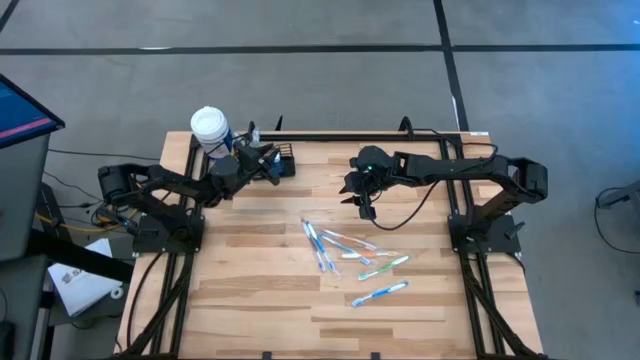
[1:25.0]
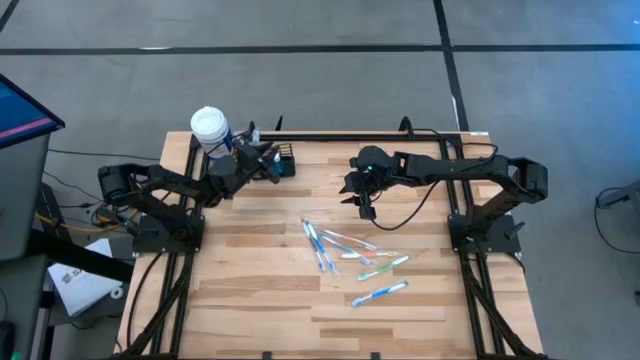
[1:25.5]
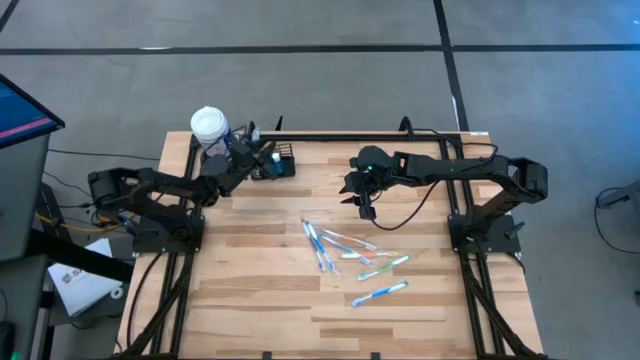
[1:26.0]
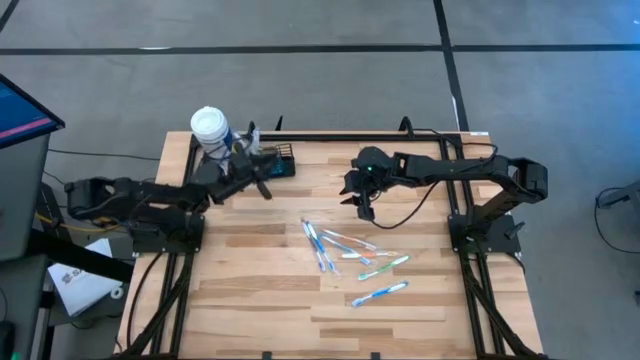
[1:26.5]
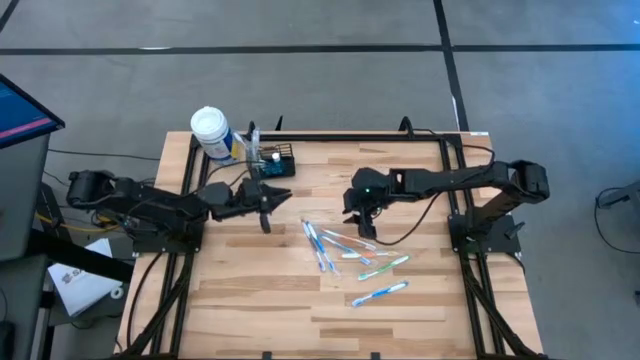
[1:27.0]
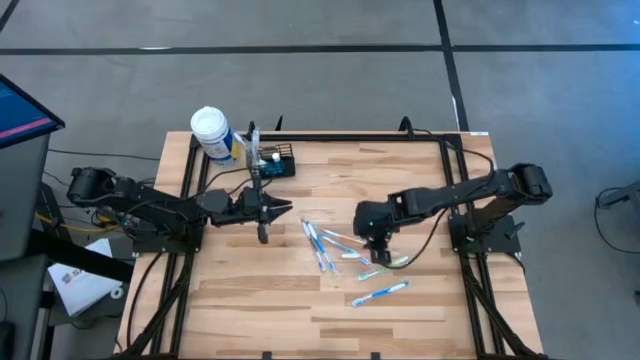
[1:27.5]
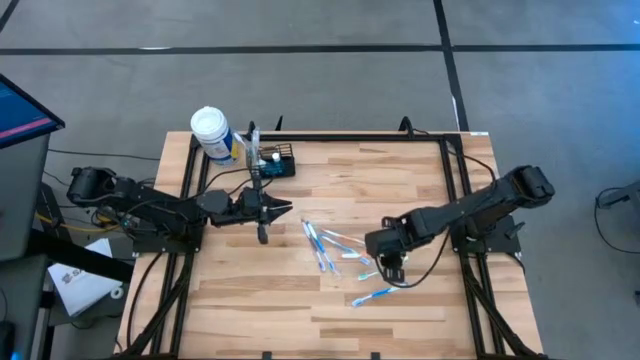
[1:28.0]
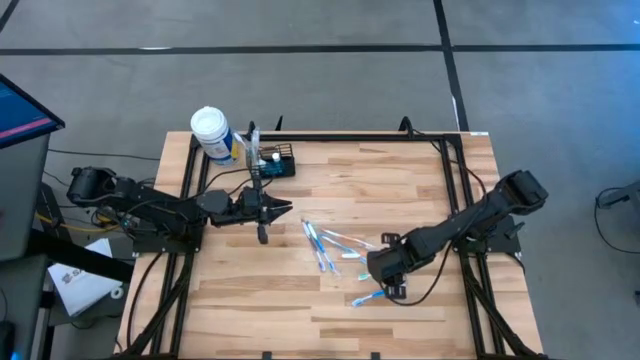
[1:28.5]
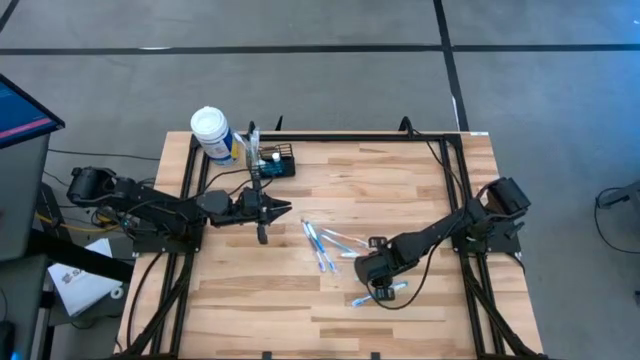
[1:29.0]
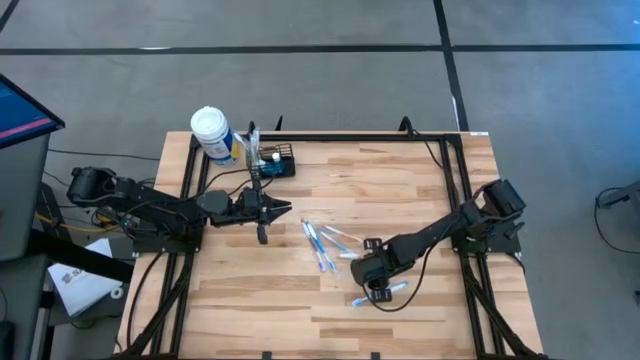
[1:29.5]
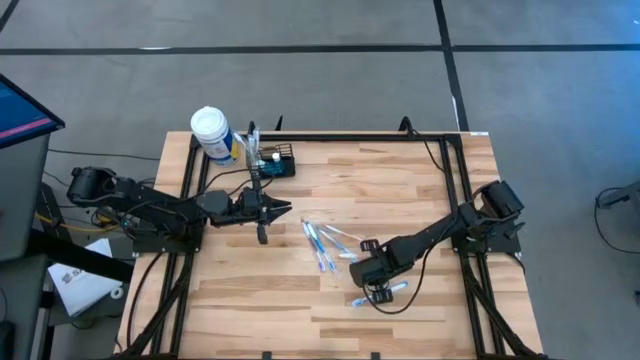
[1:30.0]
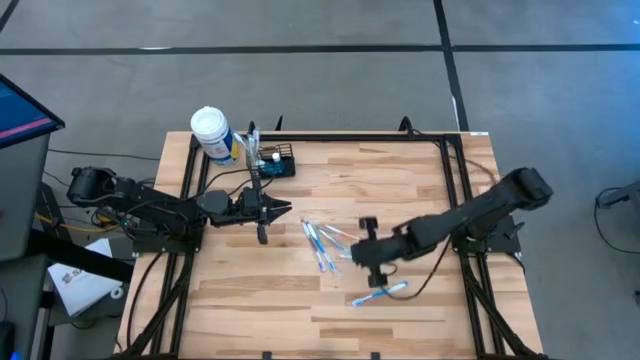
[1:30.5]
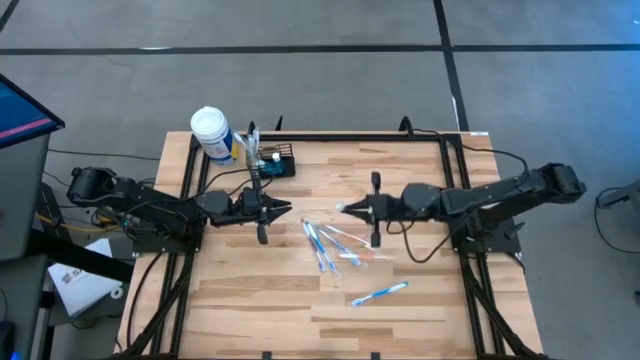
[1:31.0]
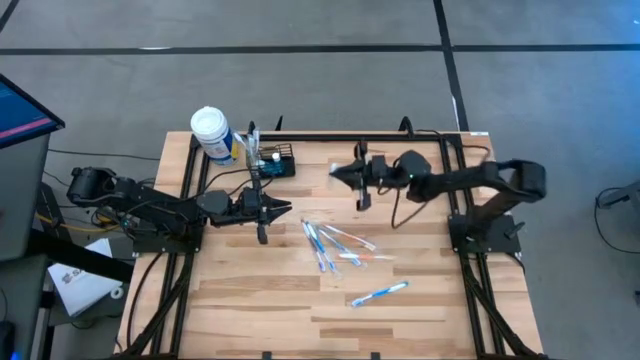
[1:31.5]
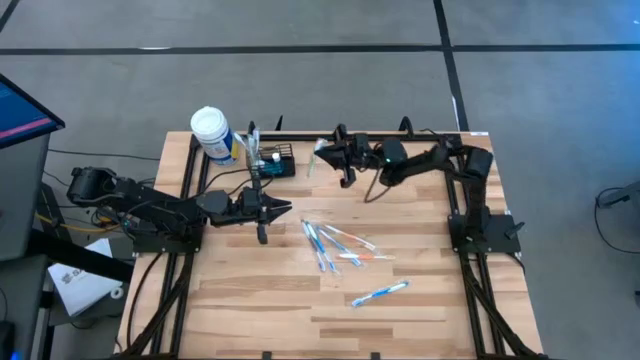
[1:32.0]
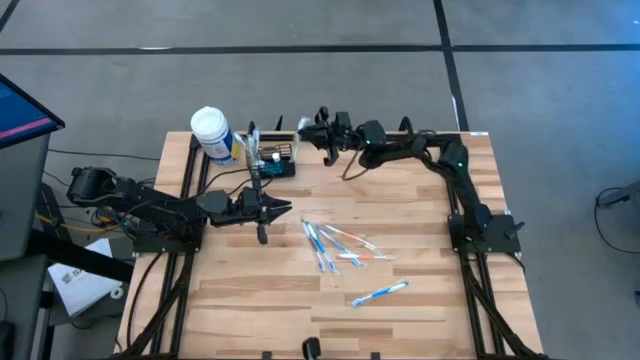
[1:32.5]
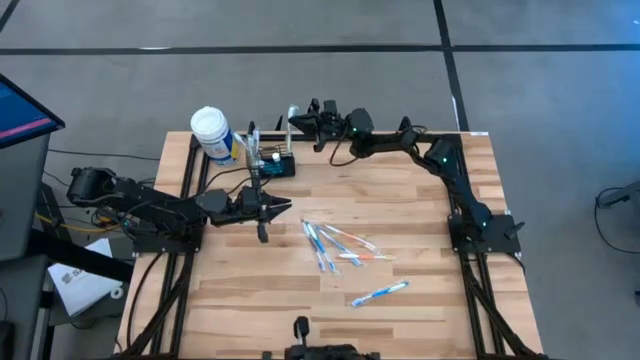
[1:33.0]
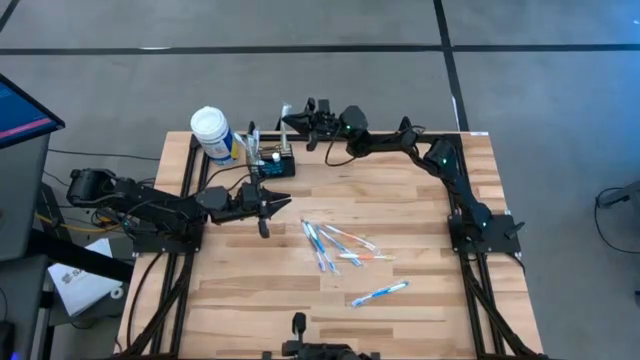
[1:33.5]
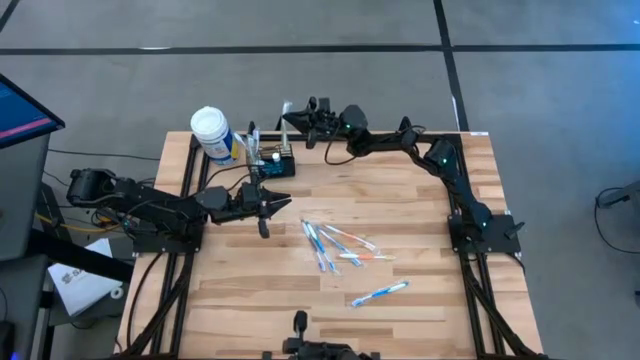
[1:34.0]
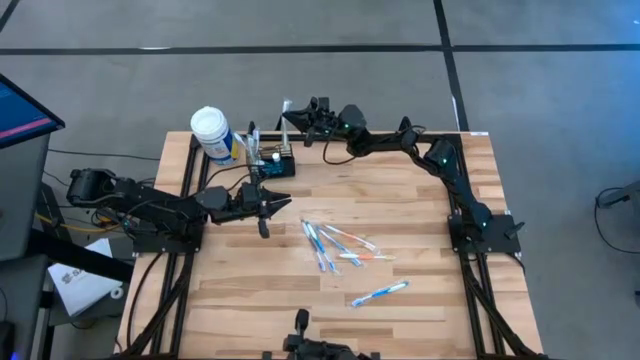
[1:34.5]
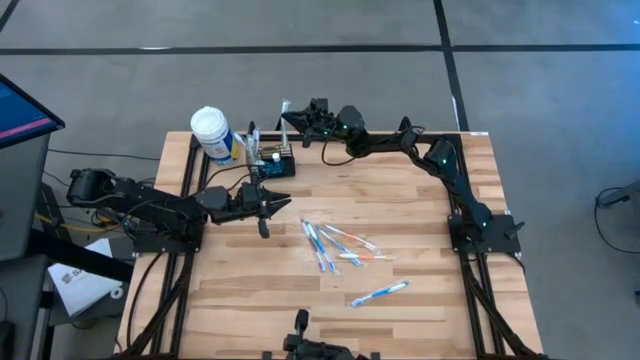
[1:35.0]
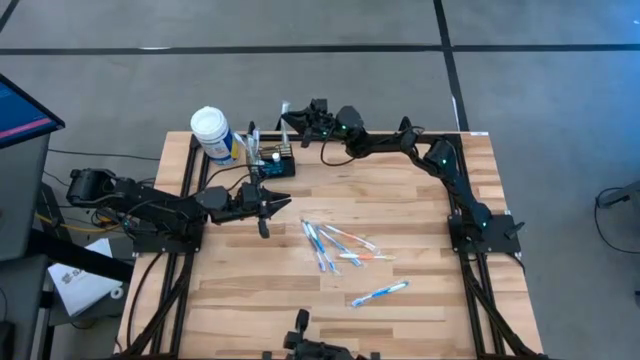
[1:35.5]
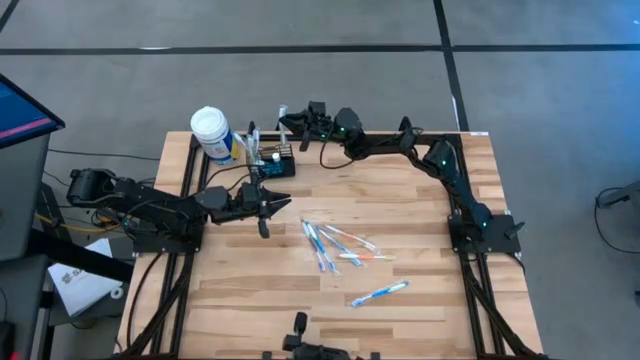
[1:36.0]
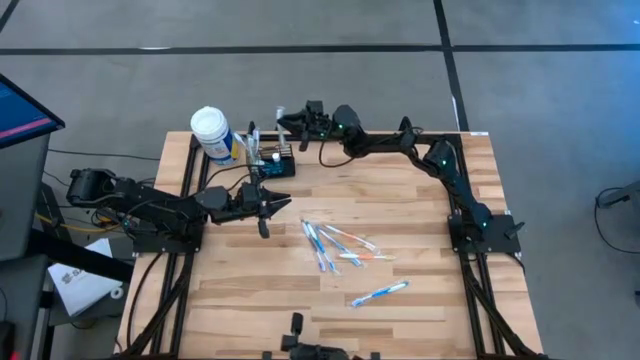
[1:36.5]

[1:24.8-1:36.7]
Task: Pick & Place toothbrushing station
Put the green toothbrush into the black wire organizer

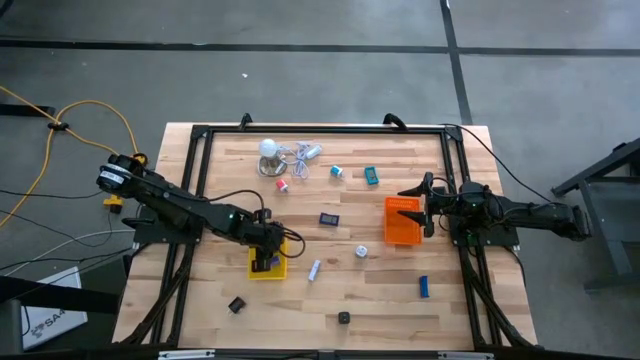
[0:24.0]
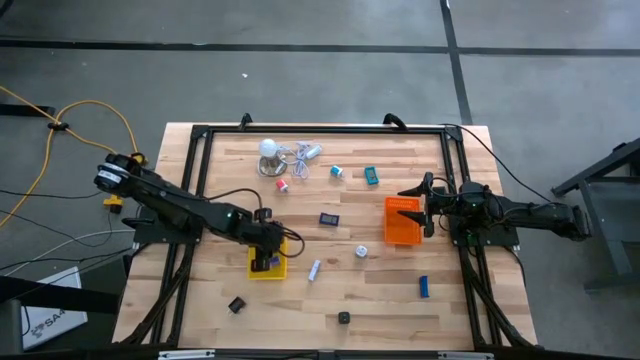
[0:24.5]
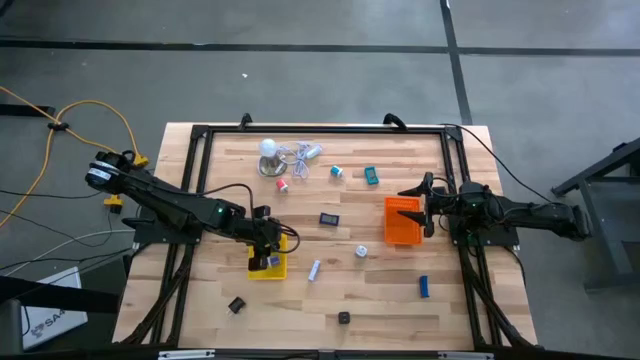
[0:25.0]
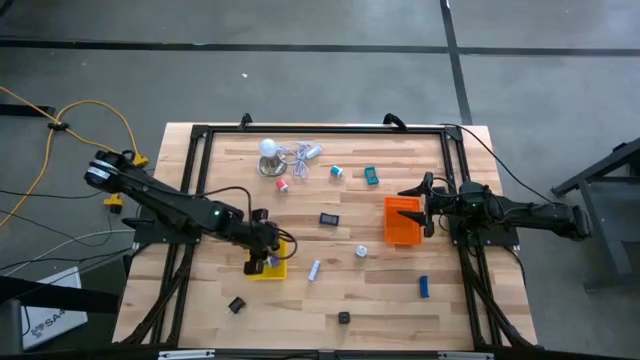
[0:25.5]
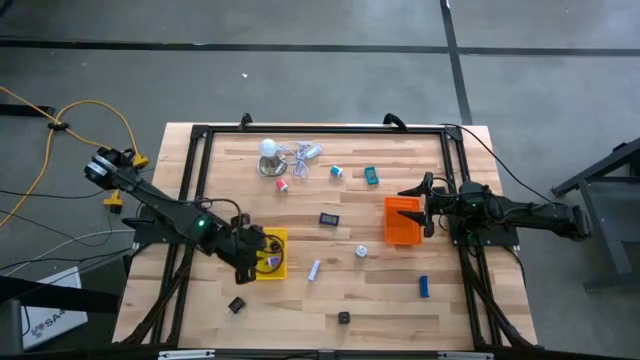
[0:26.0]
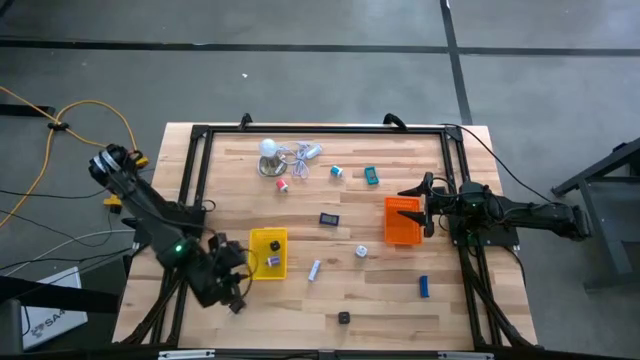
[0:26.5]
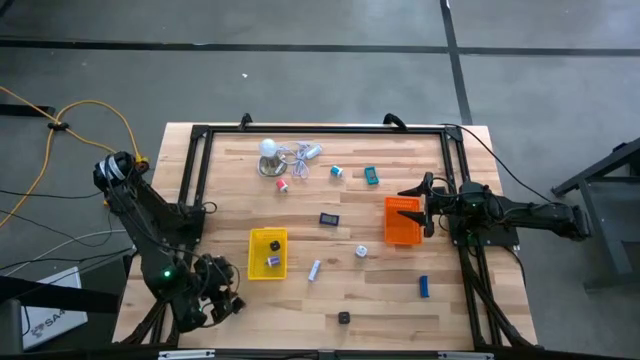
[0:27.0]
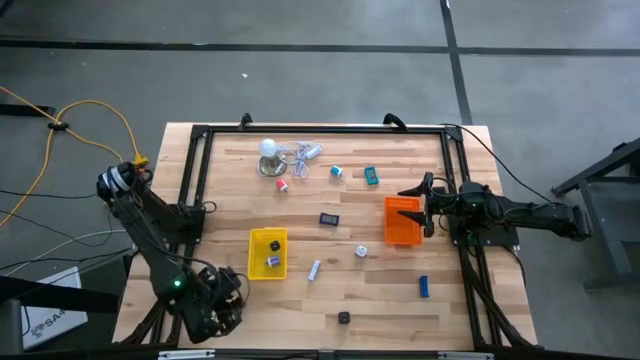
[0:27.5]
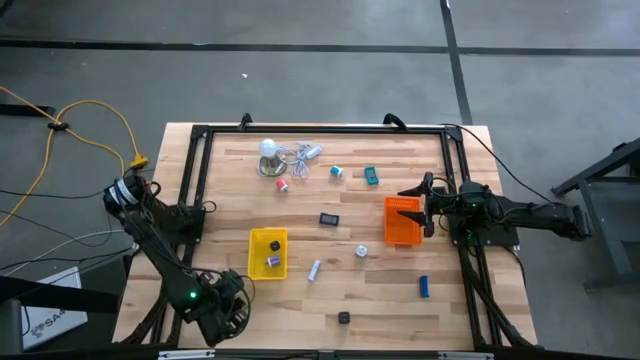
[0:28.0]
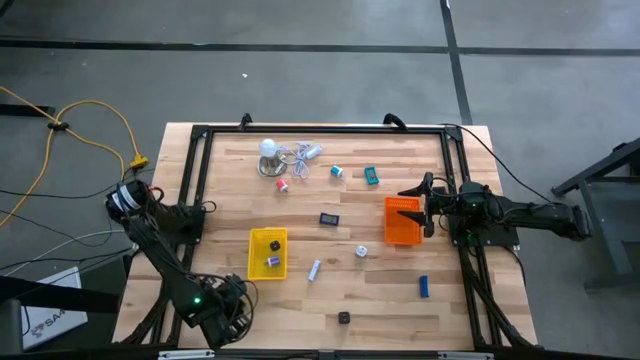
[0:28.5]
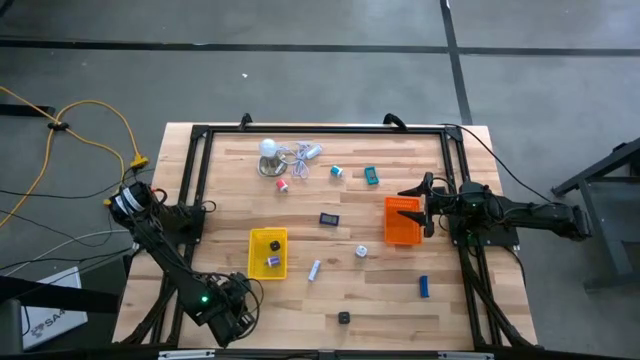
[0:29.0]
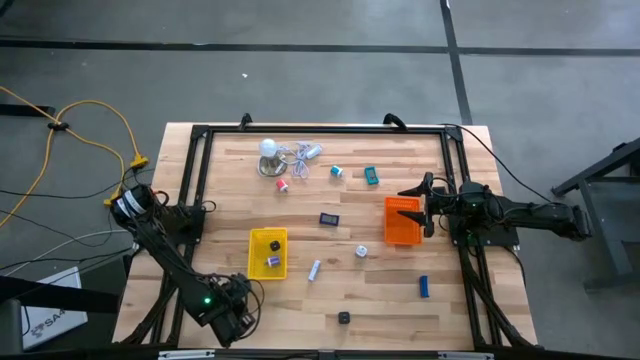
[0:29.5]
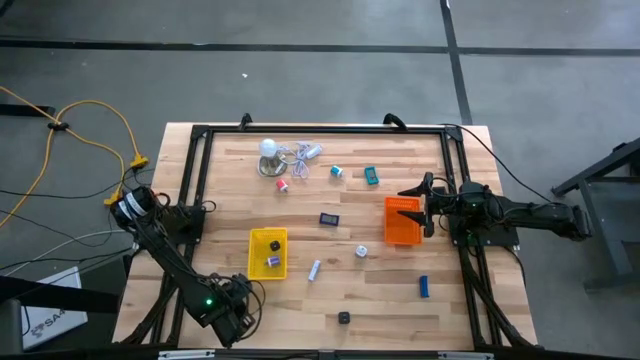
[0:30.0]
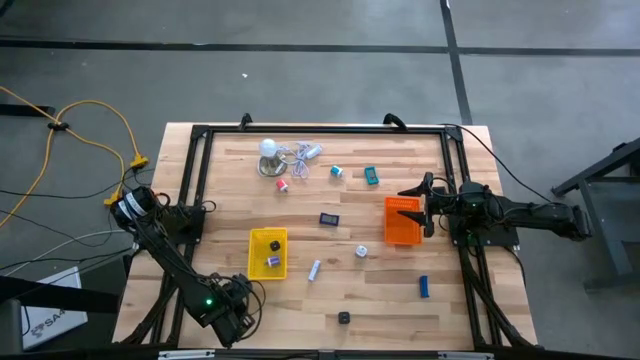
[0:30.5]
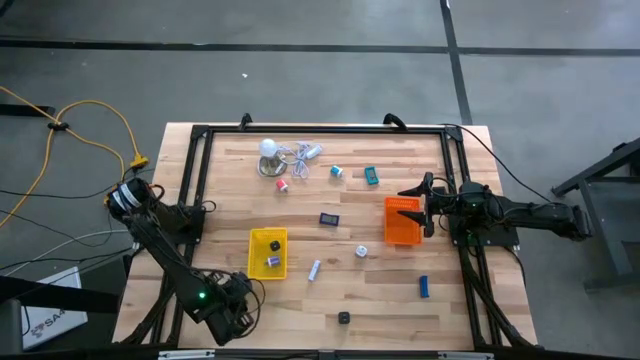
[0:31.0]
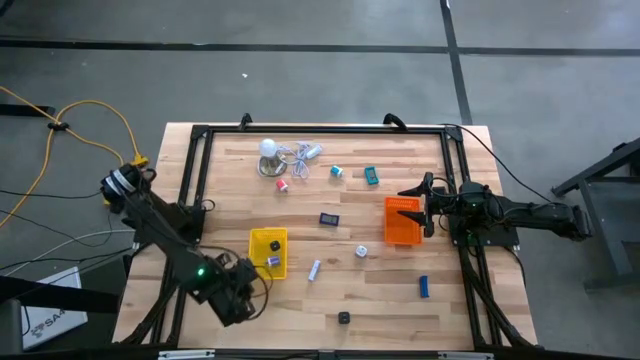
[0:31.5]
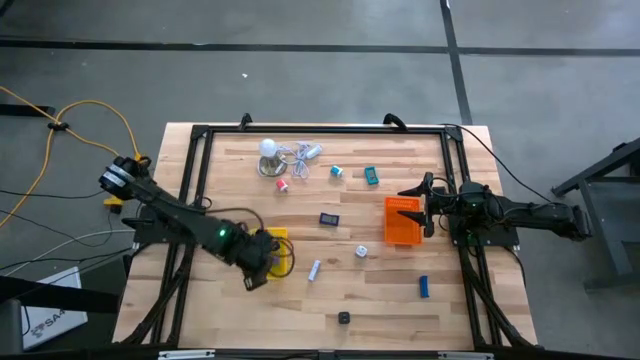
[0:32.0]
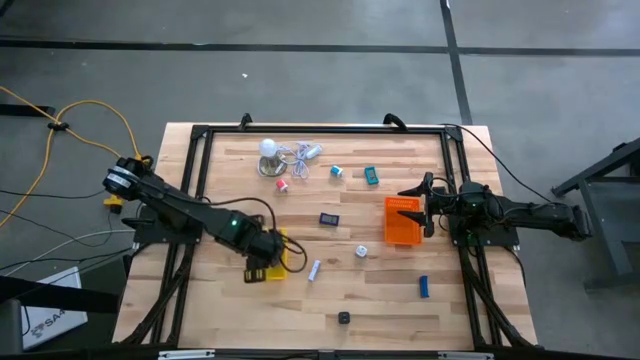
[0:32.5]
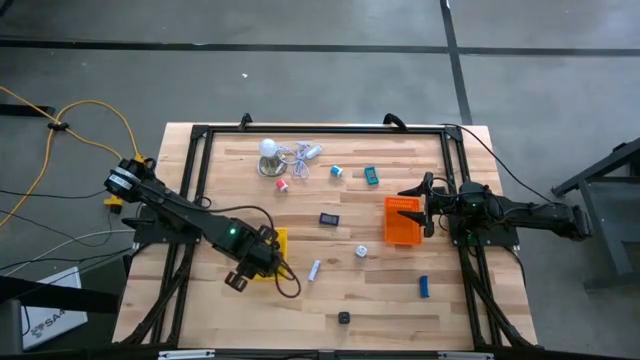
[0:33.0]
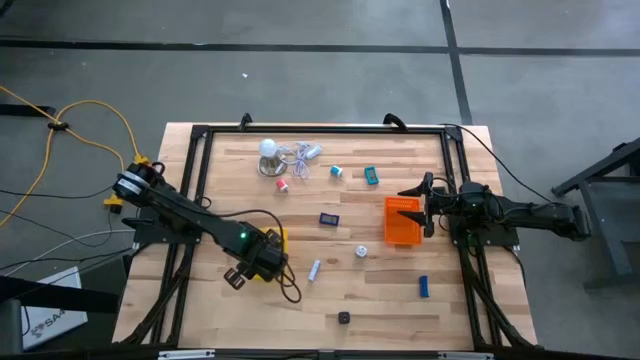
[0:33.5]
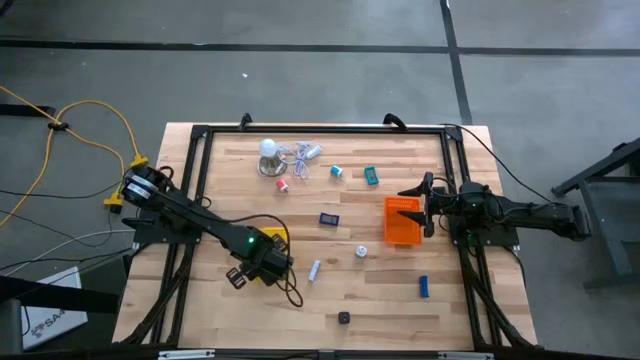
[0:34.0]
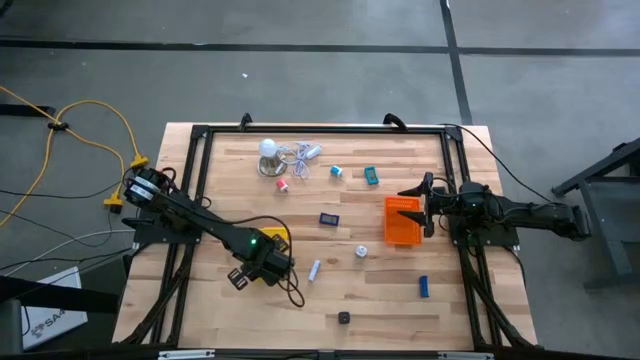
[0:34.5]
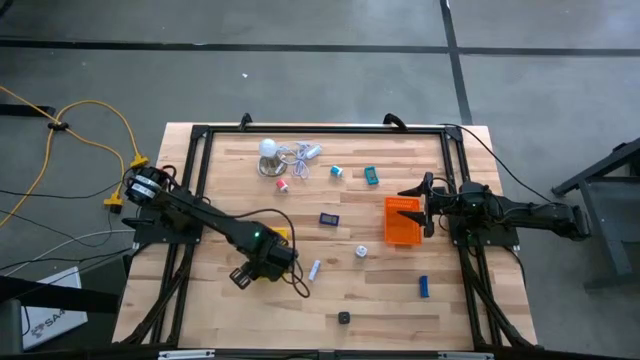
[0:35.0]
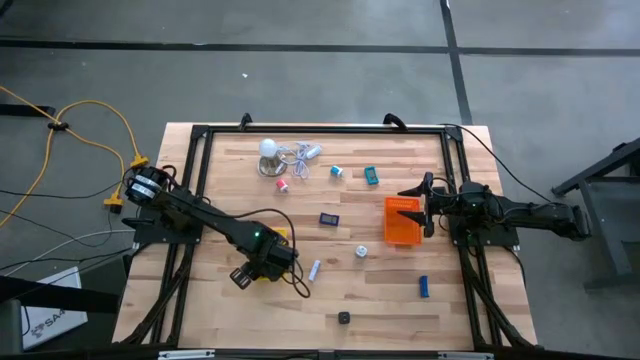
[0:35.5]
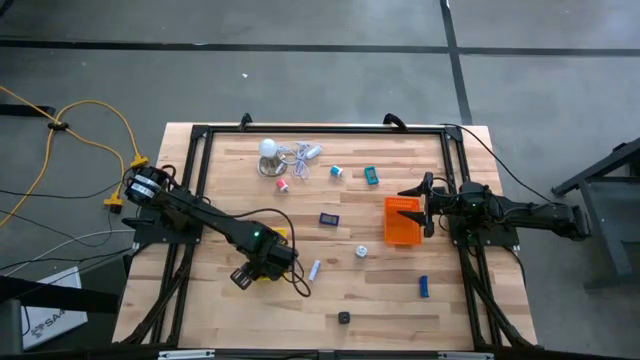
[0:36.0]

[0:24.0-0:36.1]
Task: Pick & Place Office items
Put the left black charger adapter into the yellow bin
